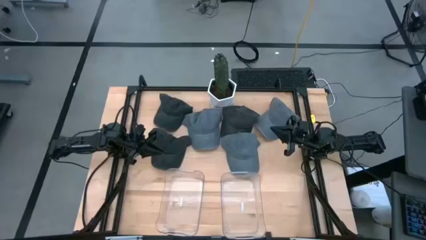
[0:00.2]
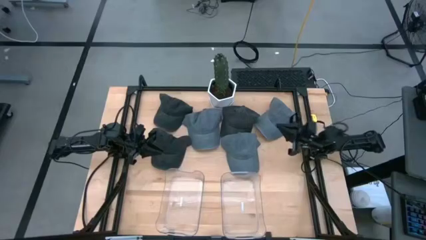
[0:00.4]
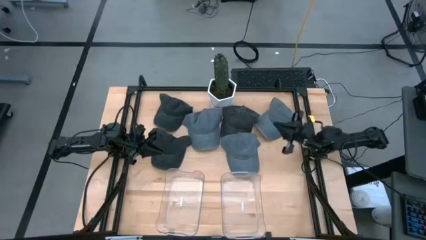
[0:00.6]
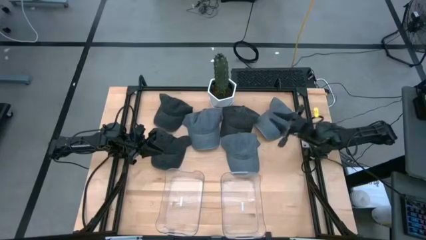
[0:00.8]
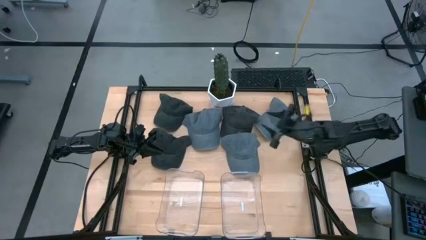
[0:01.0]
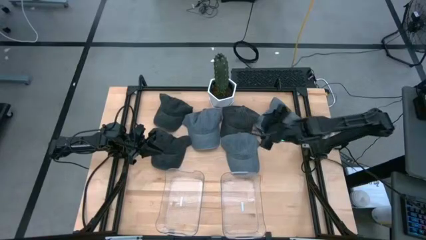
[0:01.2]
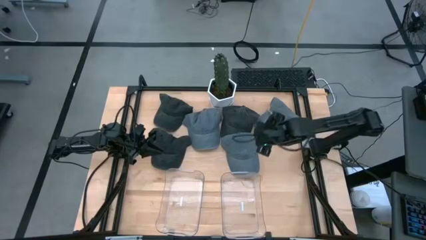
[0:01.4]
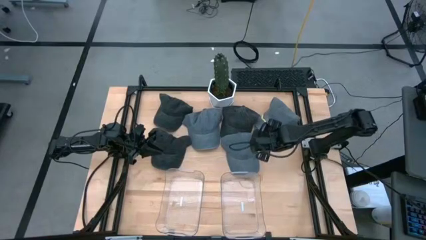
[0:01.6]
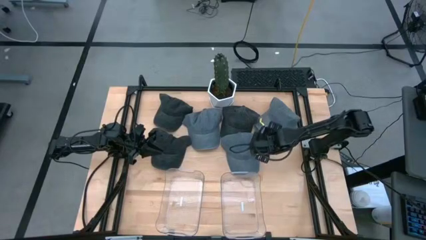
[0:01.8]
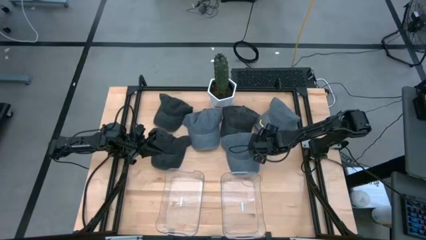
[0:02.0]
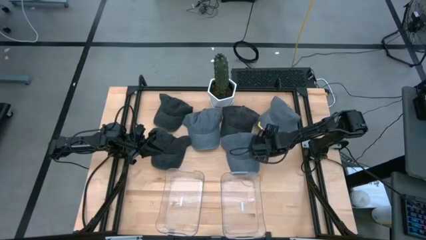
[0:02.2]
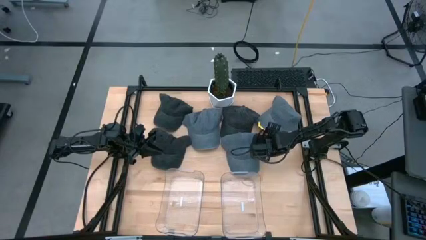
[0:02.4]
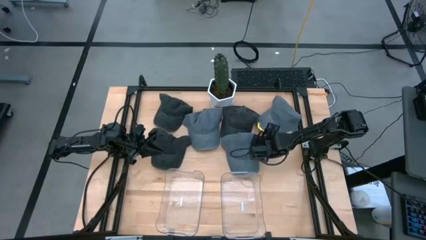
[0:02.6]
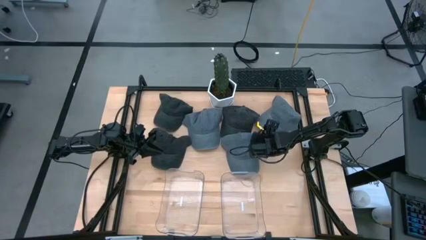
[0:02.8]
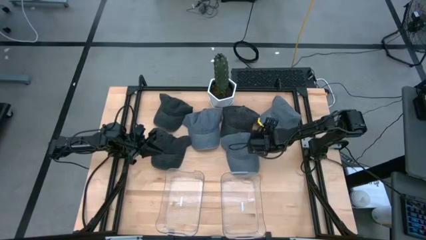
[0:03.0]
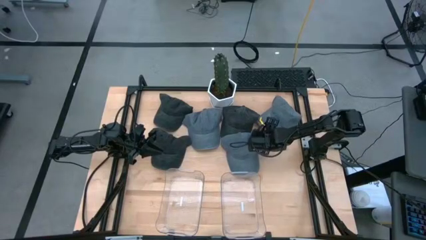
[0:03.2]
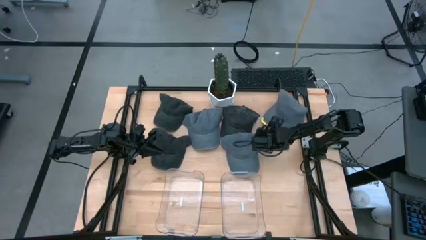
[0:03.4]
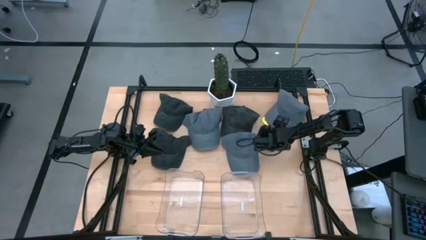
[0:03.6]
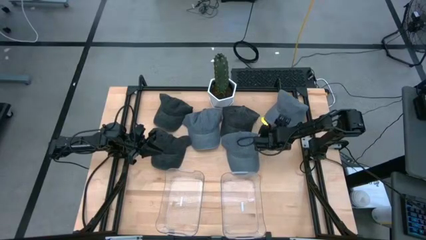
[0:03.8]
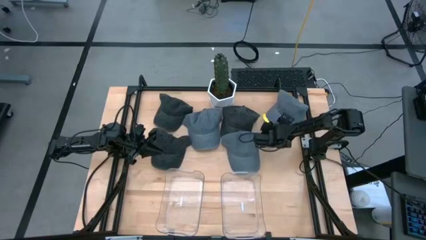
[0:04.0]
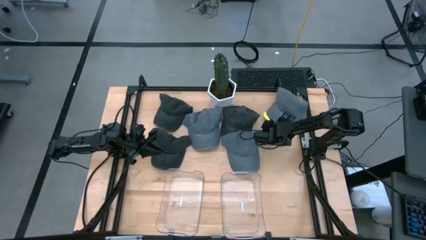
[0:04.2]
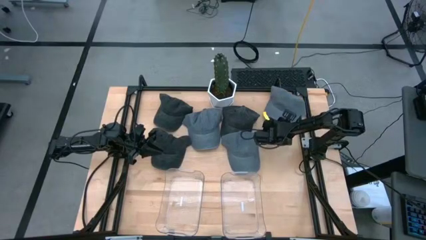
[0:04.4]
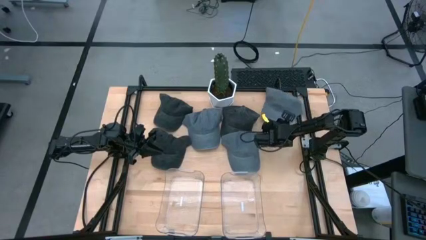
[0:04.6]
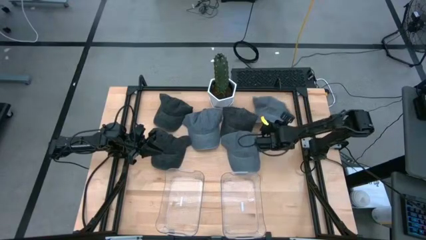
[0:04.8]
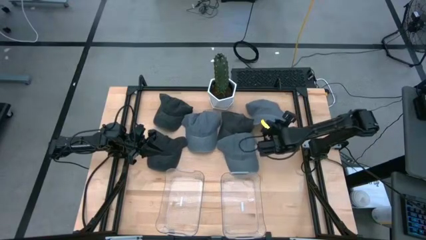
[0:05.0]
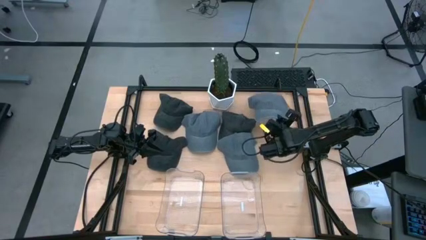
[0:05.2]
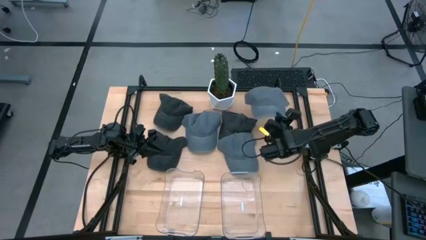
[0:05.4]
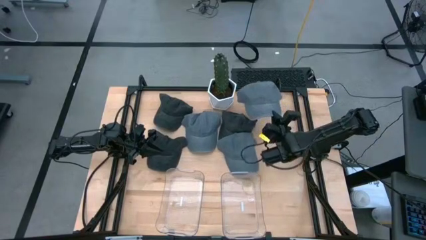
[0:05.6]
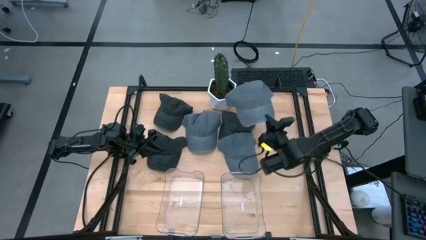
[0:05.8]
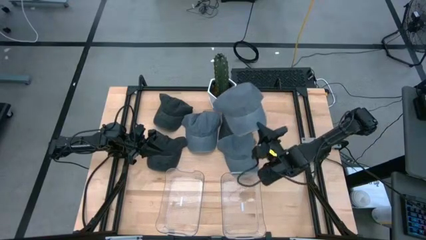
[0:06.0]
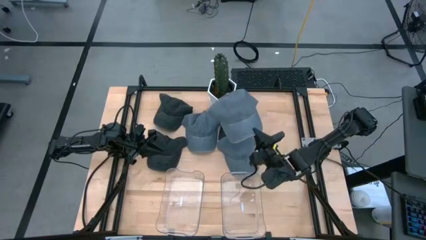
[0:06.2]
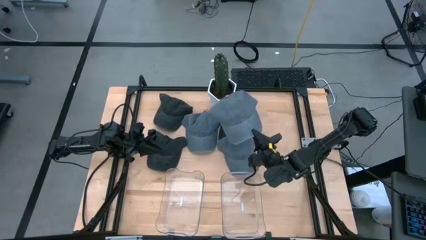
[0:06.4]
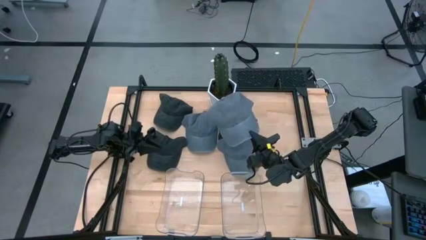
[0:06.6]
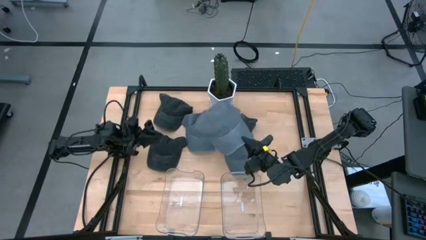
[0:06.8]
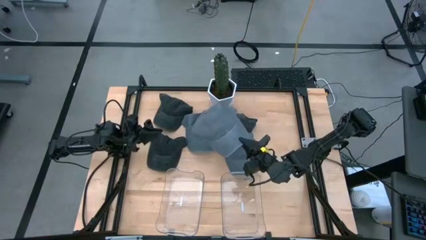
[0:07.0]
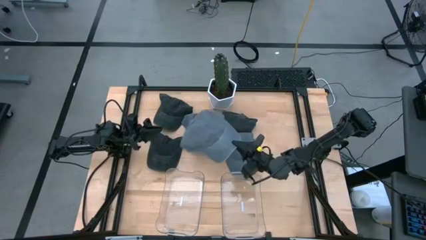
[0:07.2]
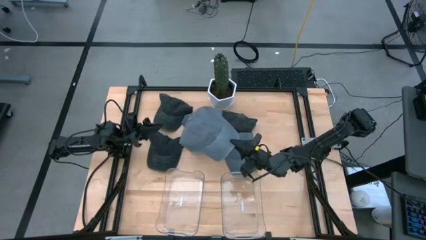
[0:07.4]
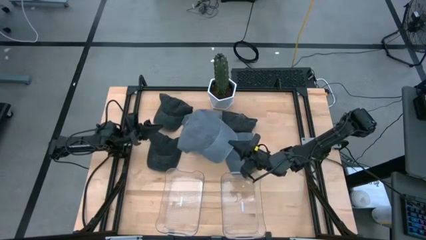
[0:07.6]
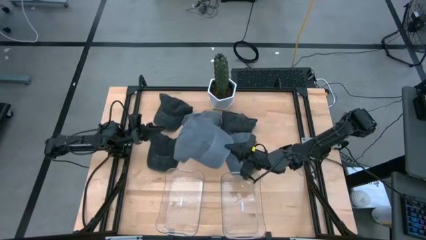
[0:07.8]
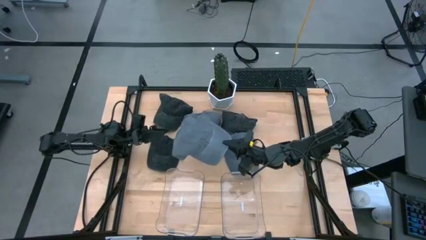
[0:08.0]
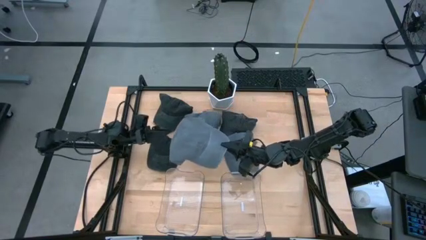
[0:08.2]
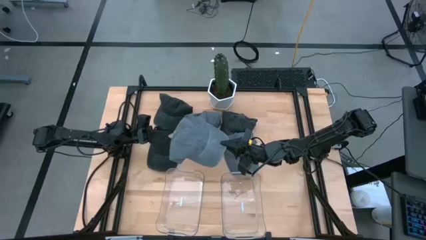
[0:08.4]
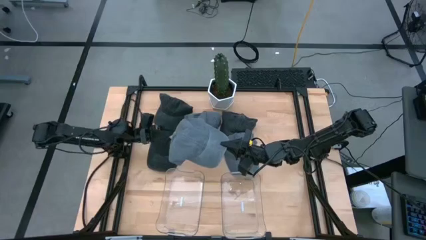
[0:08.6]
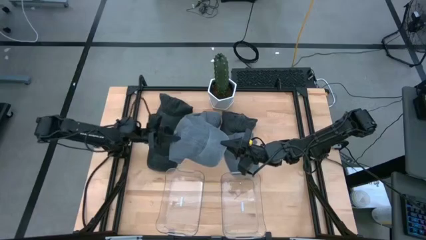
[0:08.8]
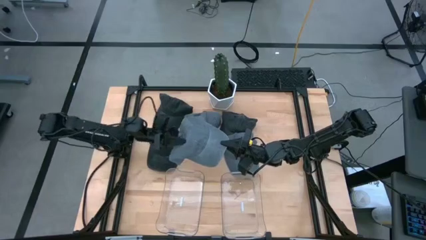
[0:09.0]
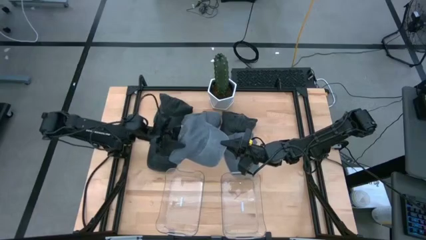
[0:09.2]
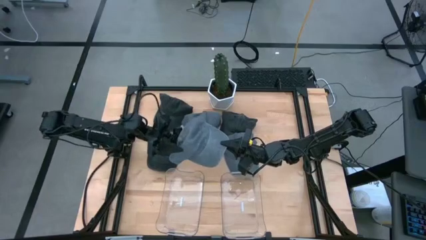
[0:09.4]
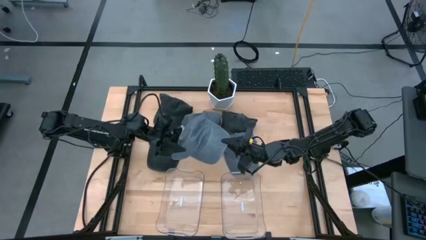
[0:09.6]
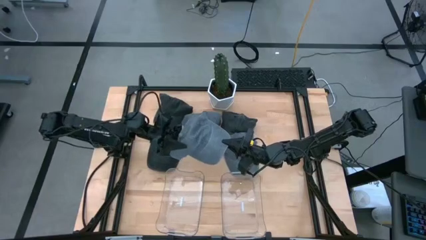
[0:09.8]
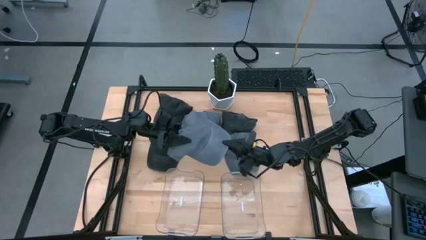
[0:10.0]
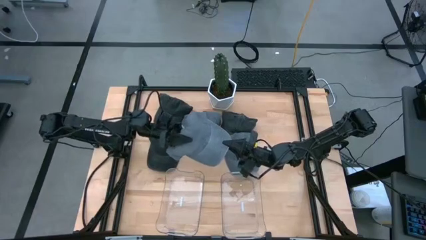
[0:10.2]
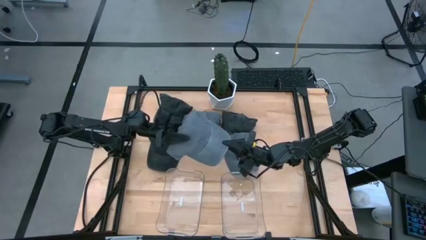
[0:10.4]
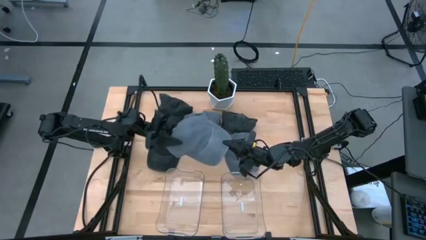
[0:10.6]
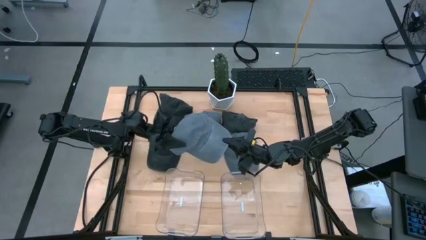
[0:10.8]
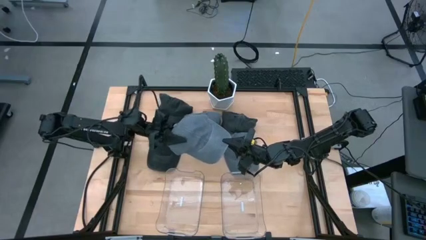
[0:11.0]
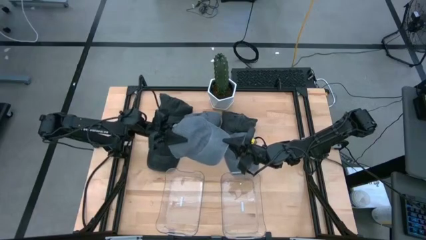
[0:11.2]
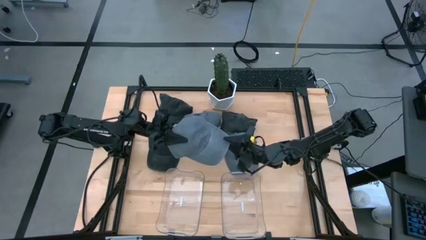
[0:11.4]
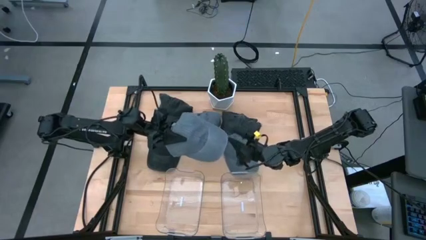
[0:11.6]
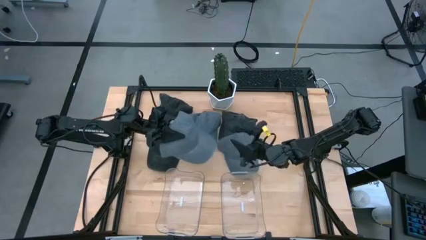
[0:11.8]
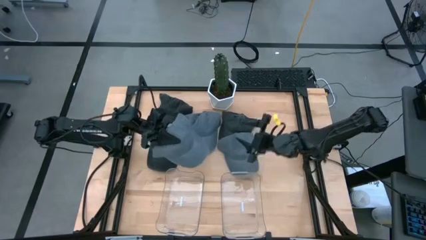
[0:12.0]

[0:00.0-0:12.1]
Task: Pick & Place hat
Put the top right gray cap into the left transparent bin
